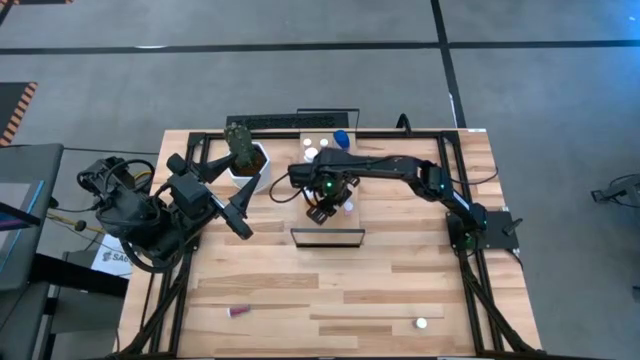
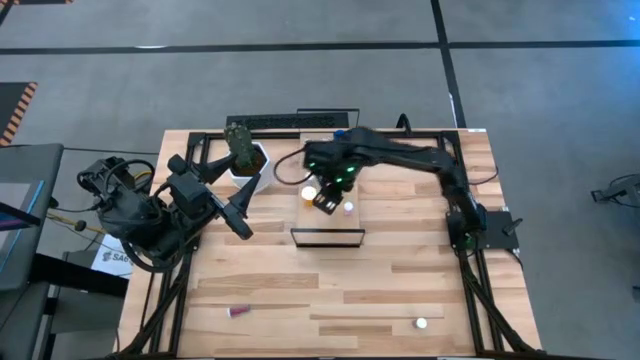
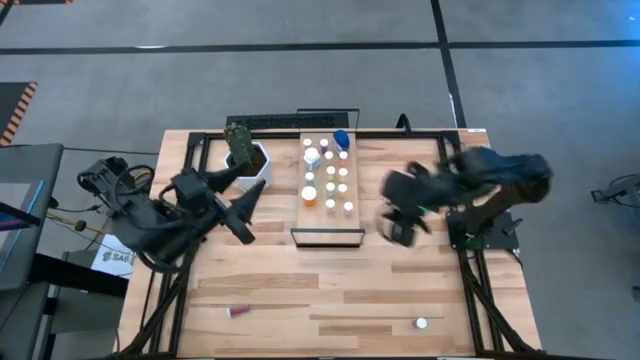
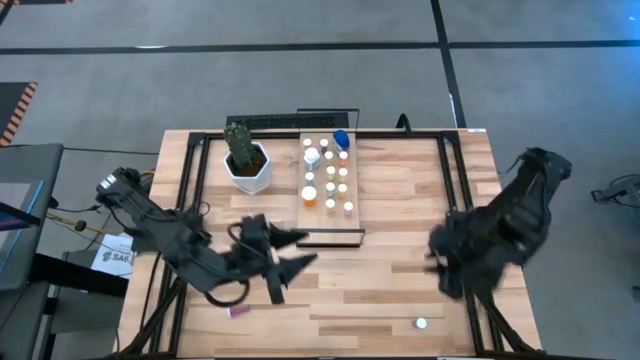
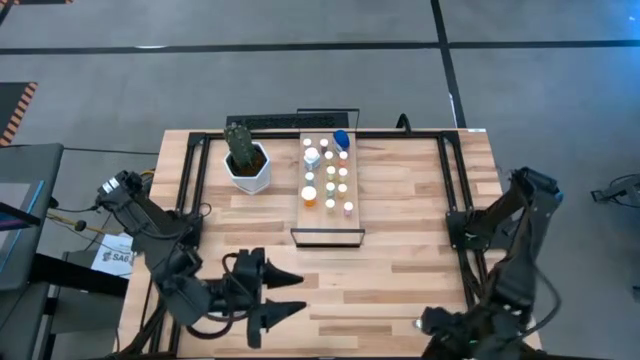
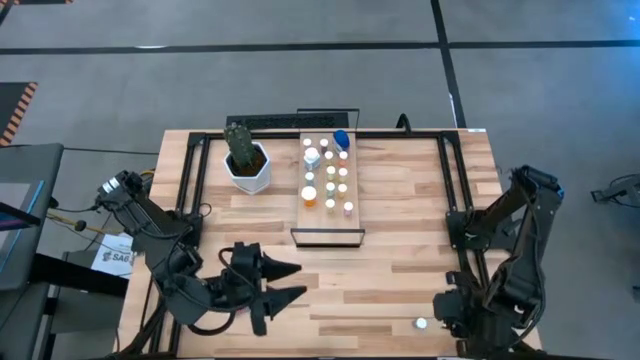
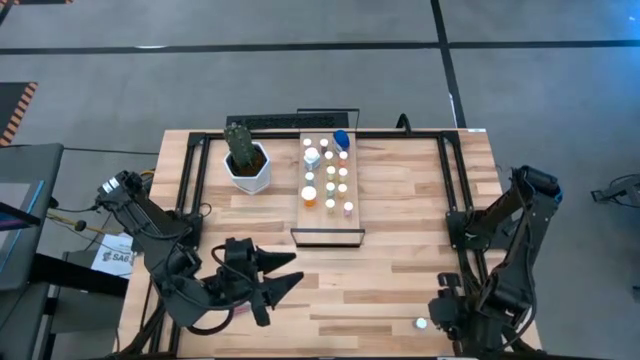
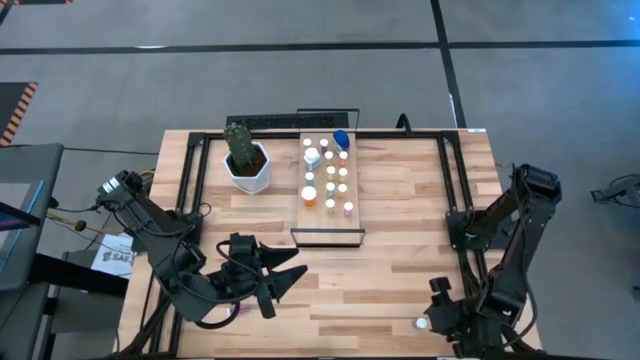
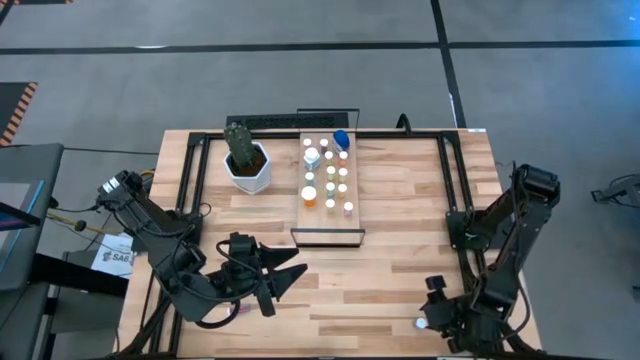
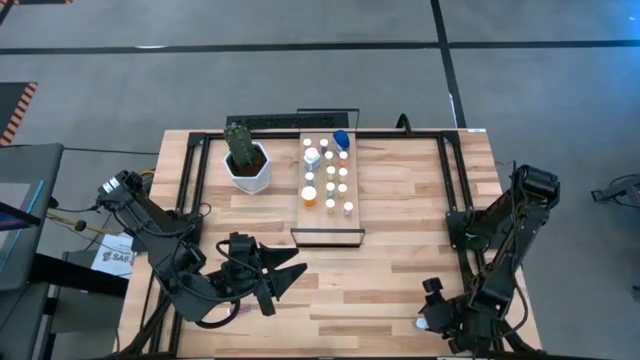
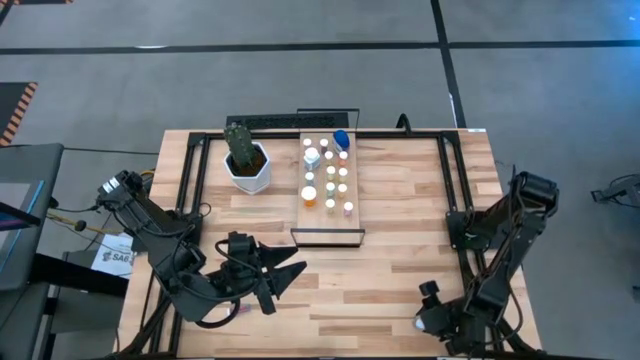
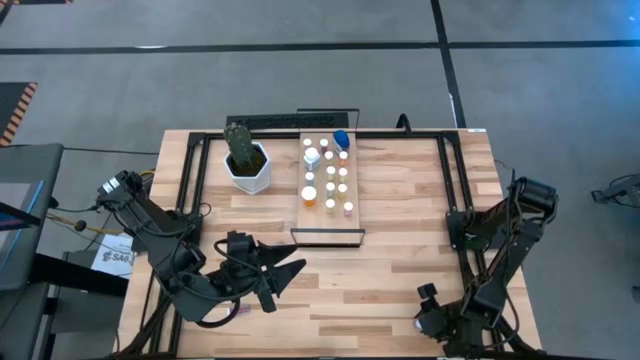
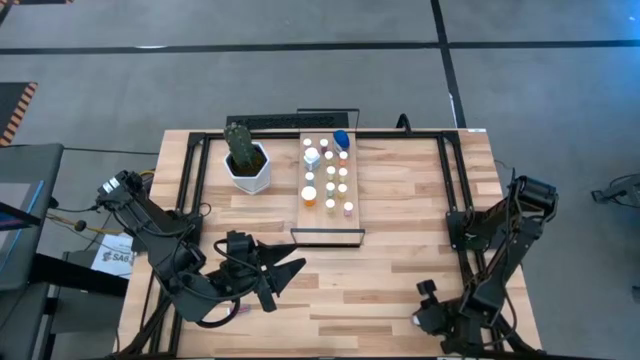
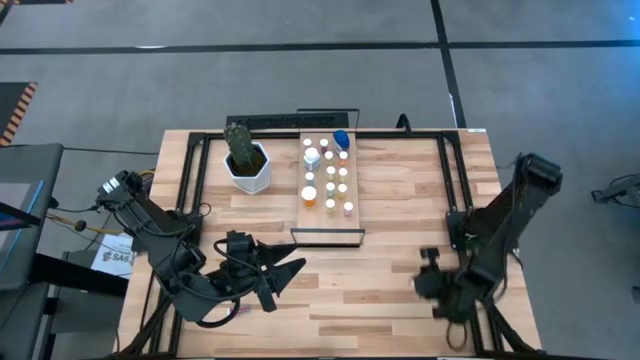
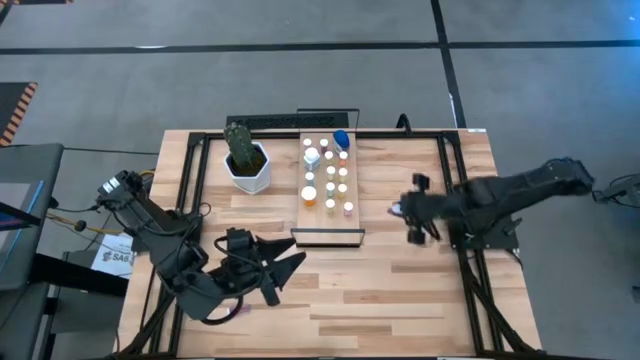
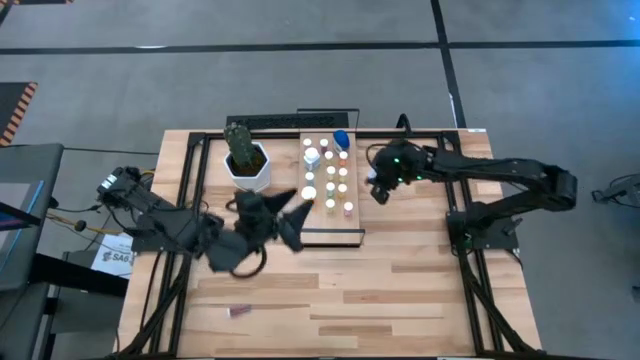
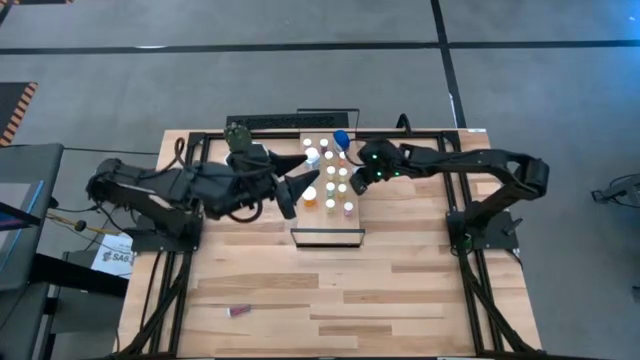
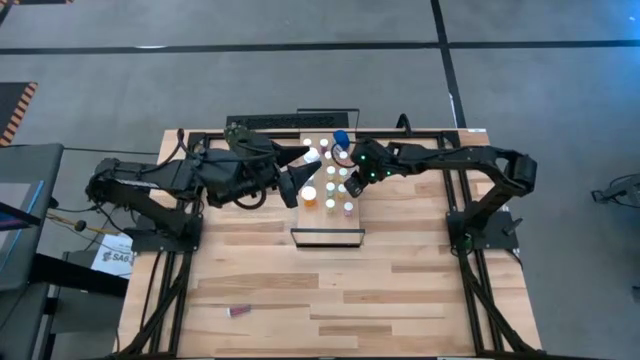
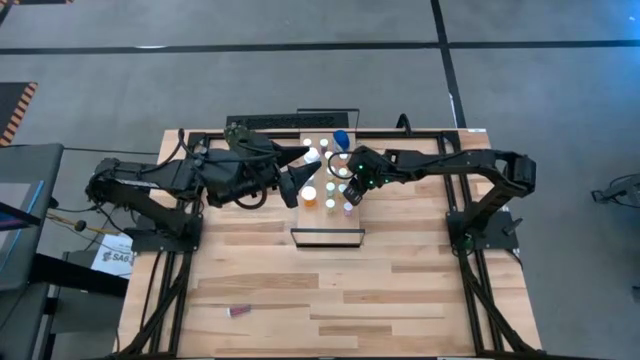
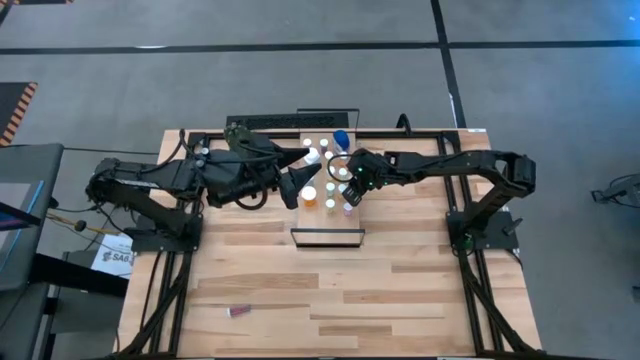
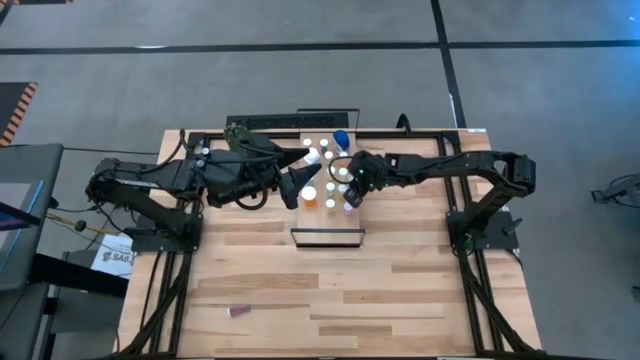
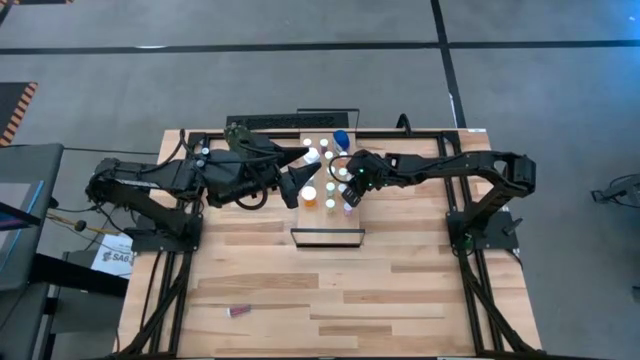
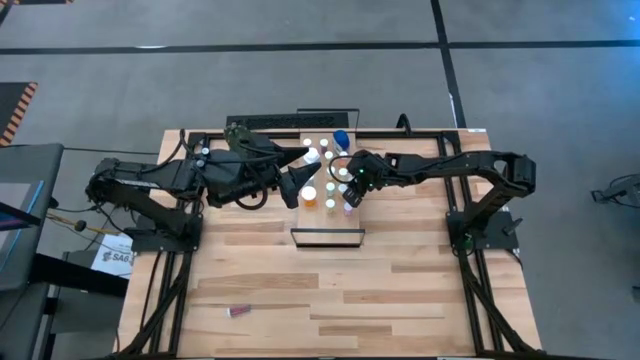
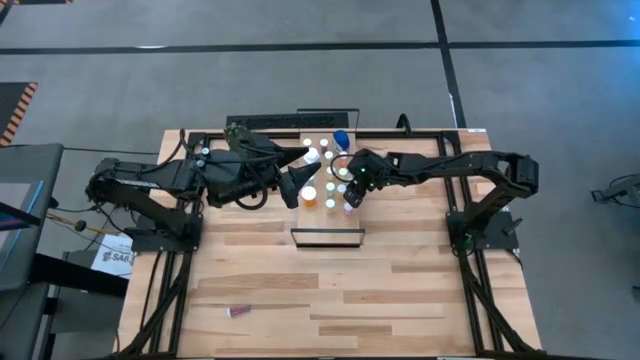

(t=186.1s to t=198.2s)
Task: Pick and place medicine bottles onto shelf by color
Put the right blue pill bottle on the shelf

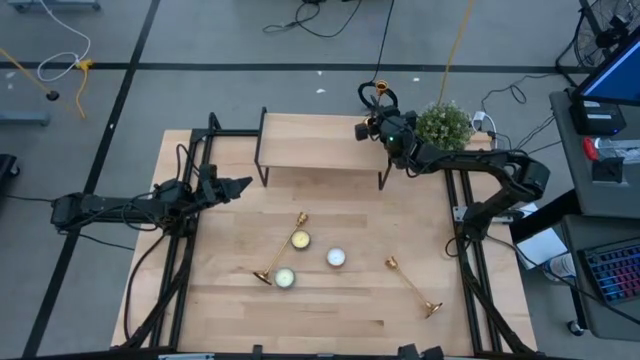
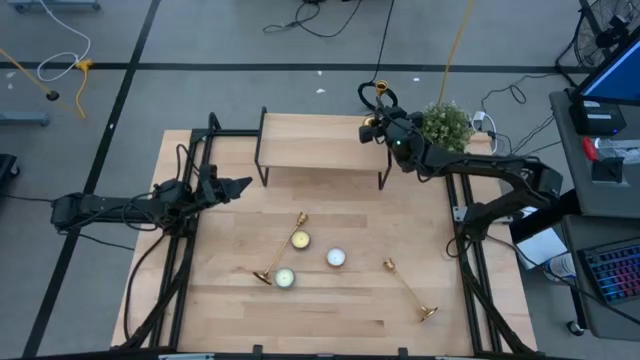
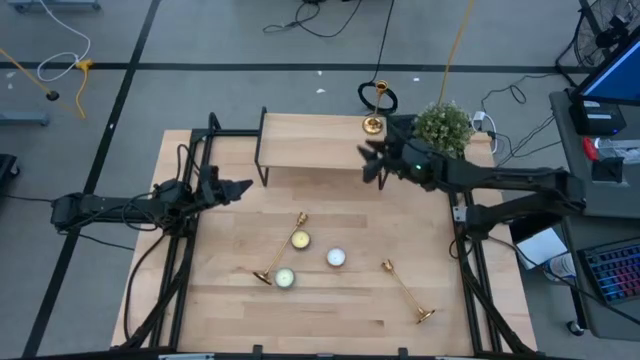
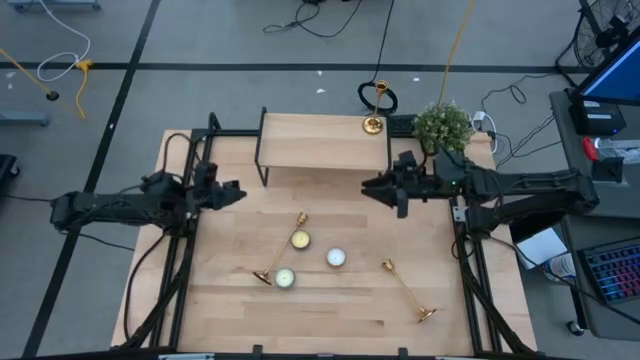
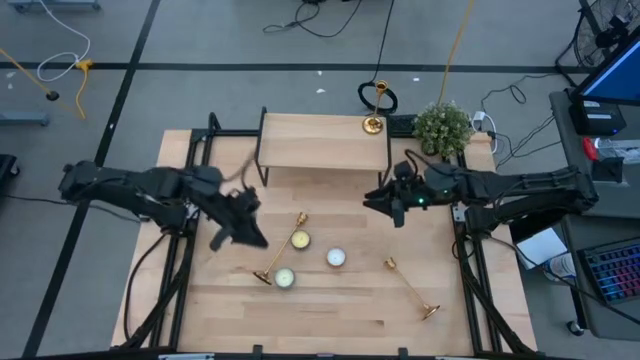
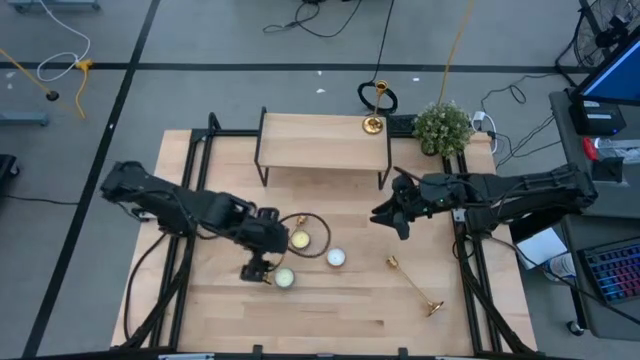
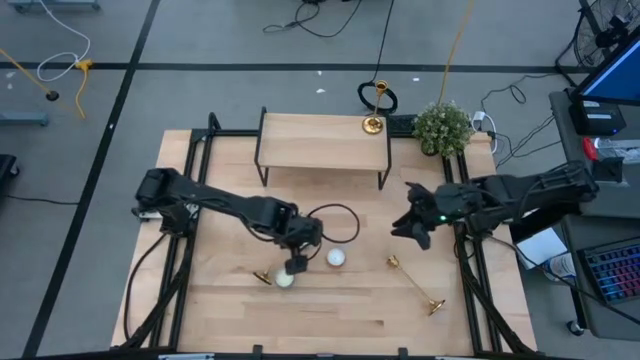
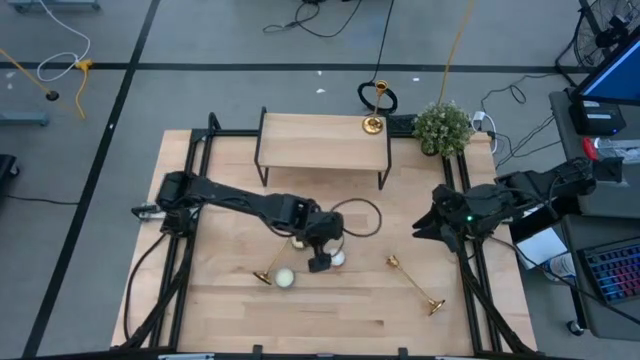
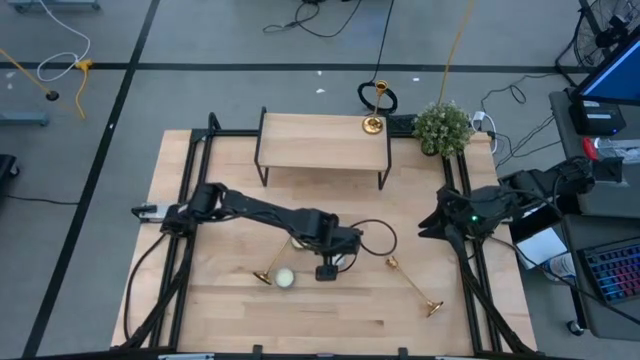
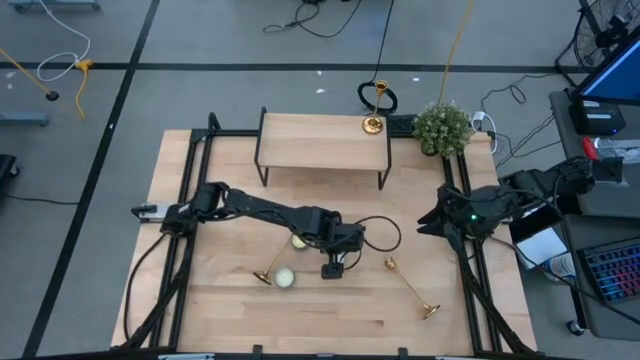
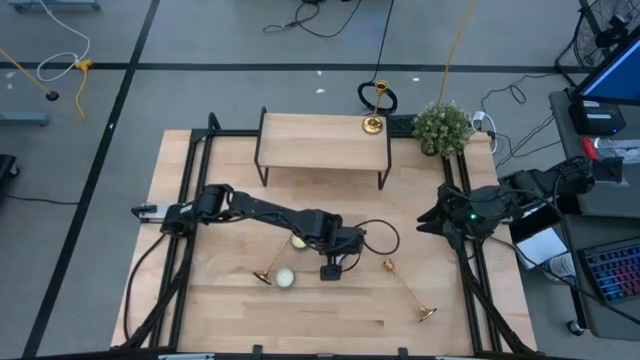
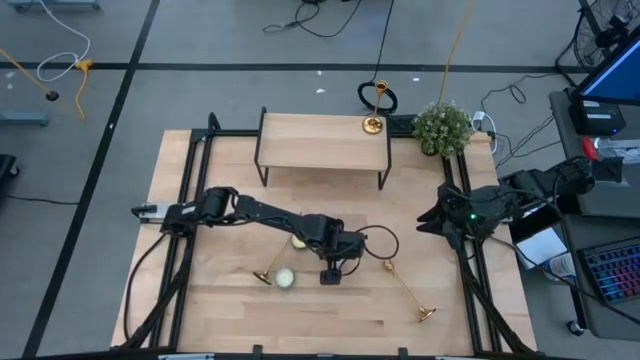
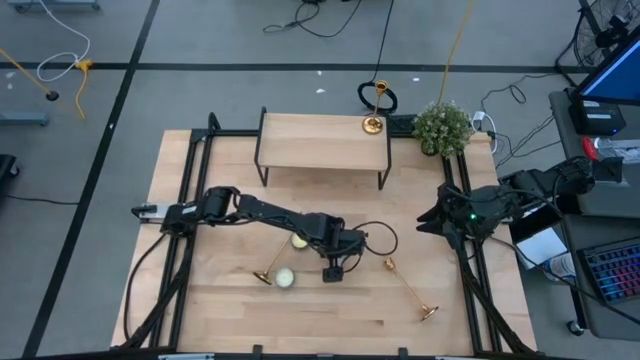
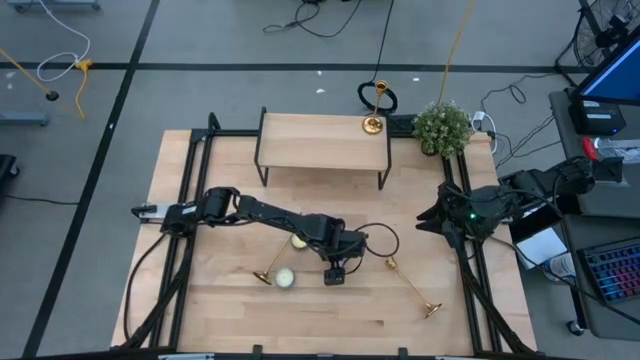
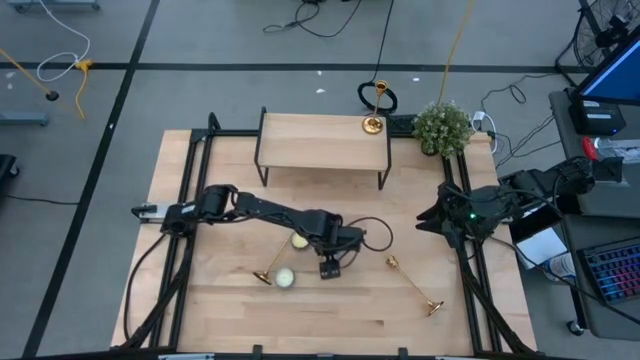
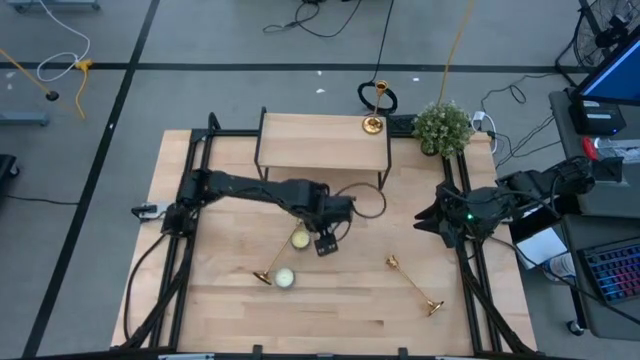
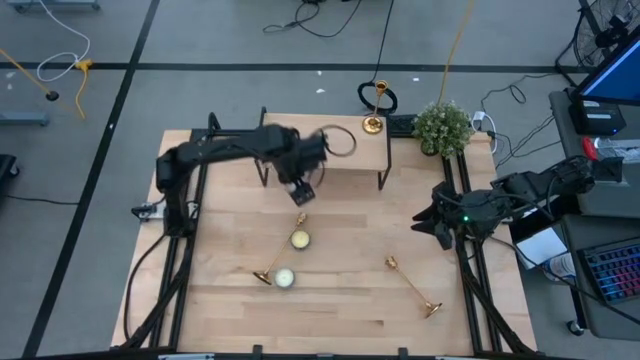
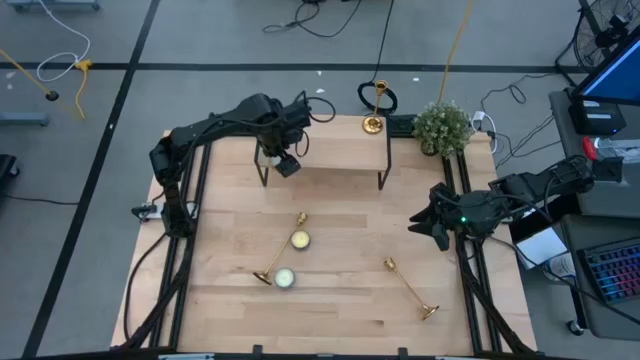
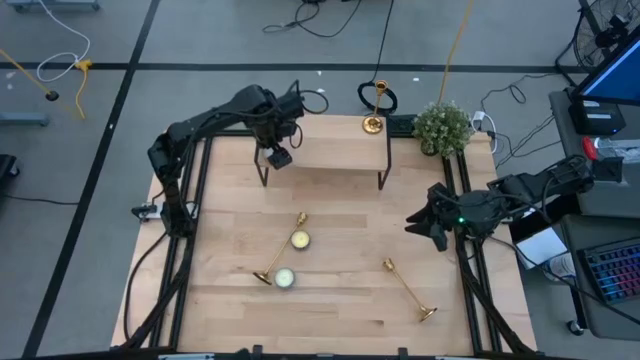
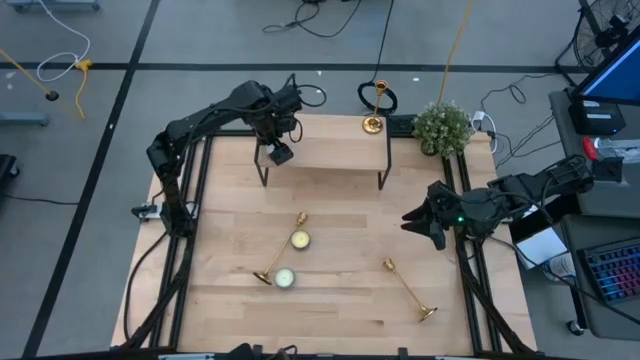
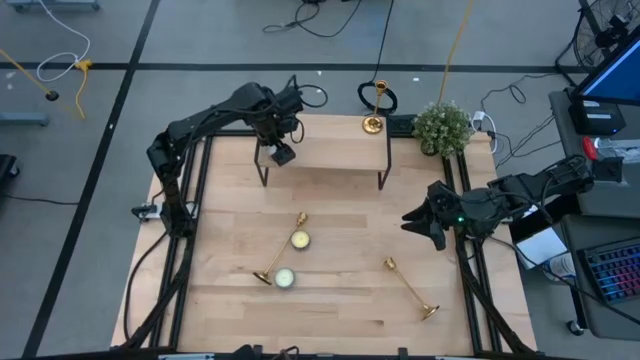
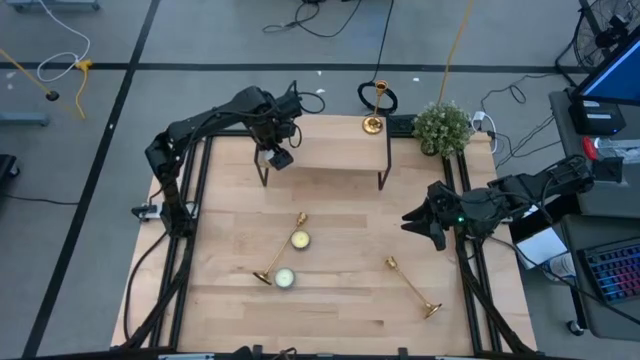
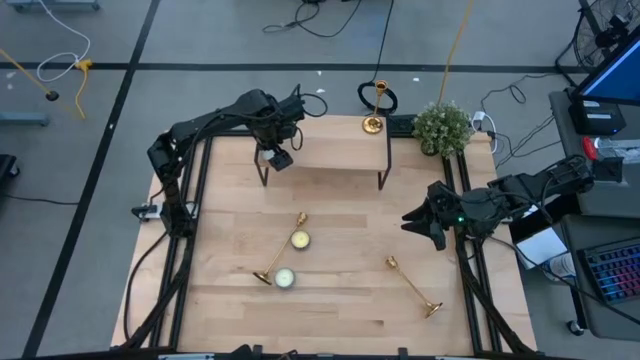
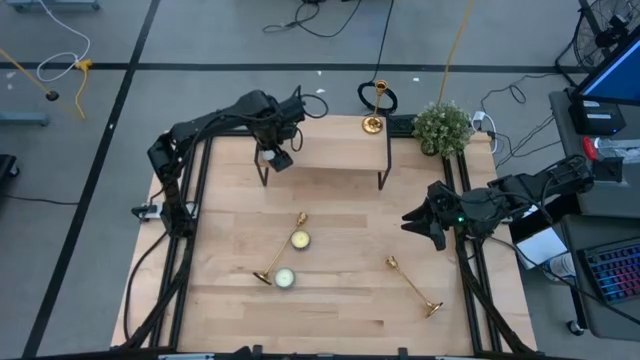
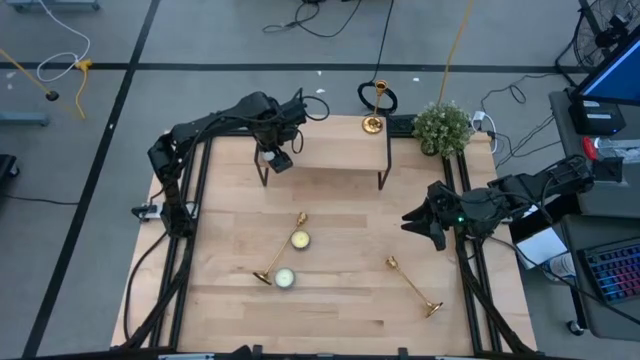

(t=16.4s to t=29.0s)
Task: Pick & Place candle stick holders
Put the orange scented candle on the shelf
